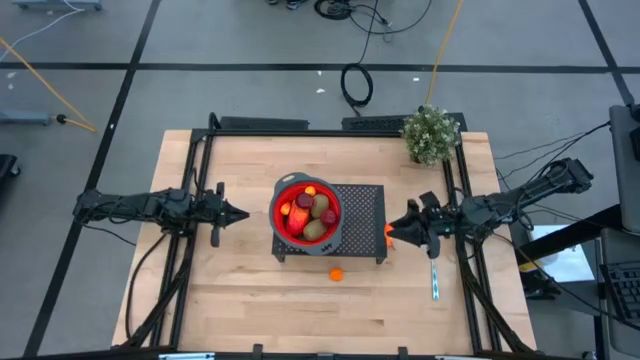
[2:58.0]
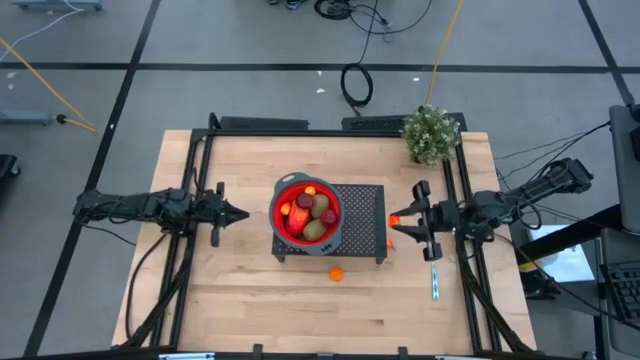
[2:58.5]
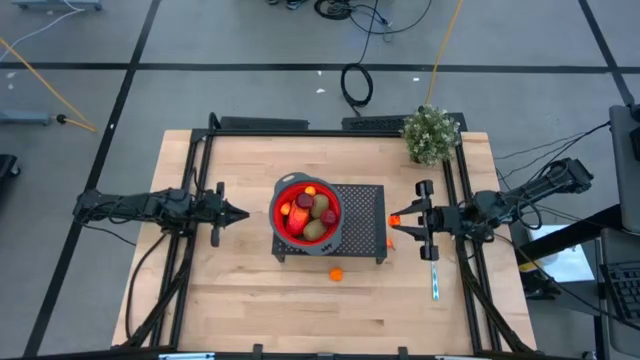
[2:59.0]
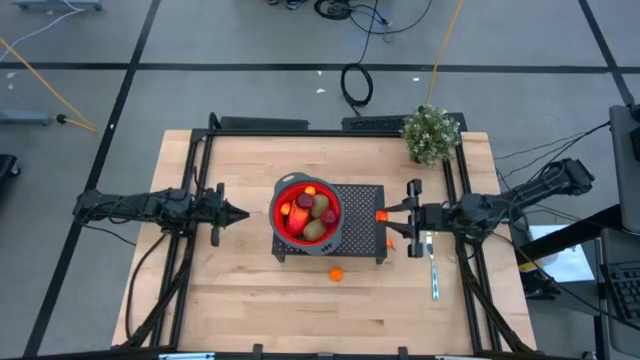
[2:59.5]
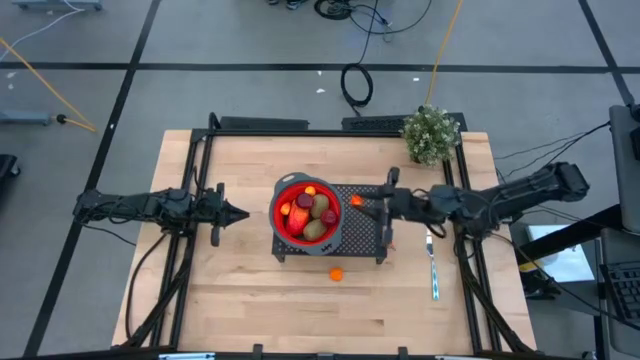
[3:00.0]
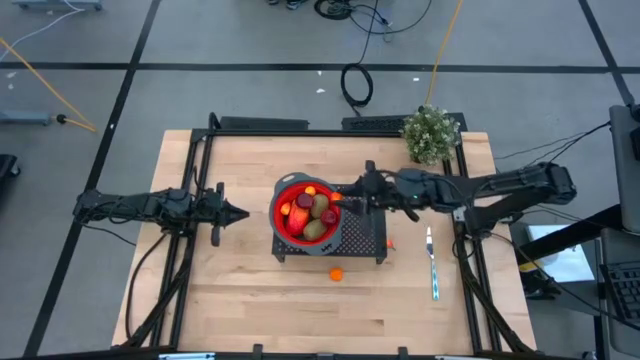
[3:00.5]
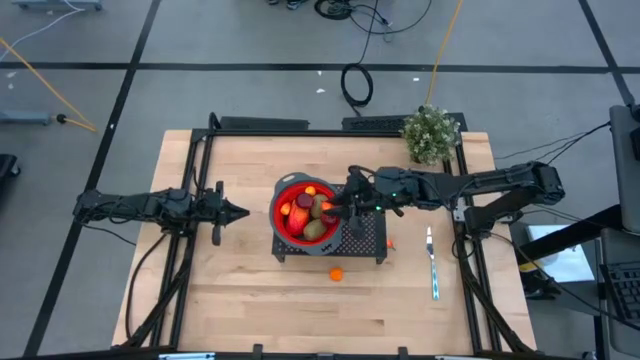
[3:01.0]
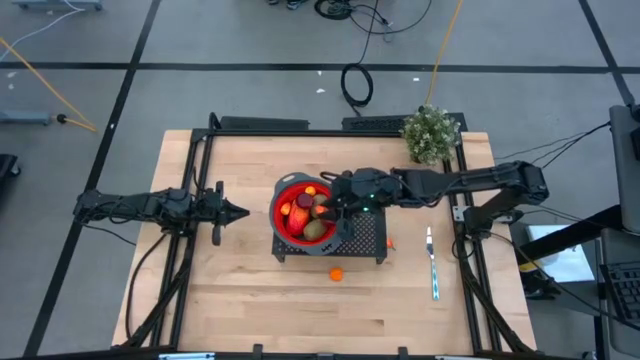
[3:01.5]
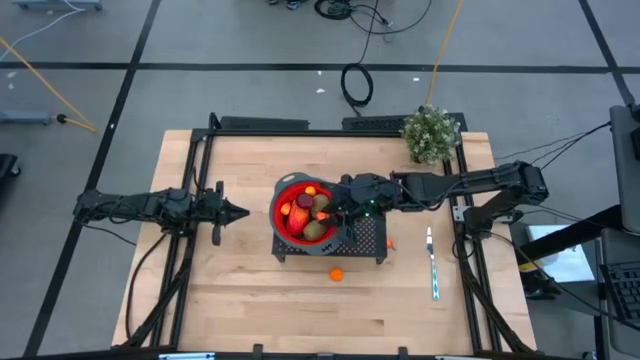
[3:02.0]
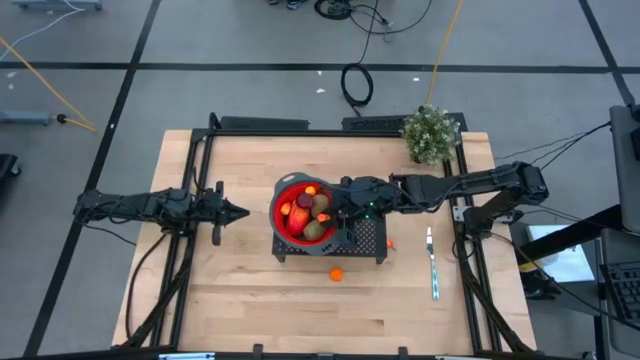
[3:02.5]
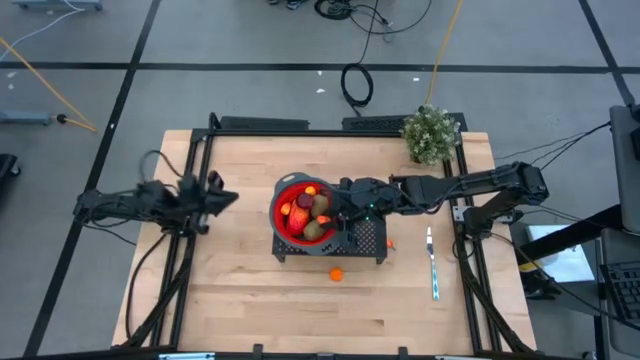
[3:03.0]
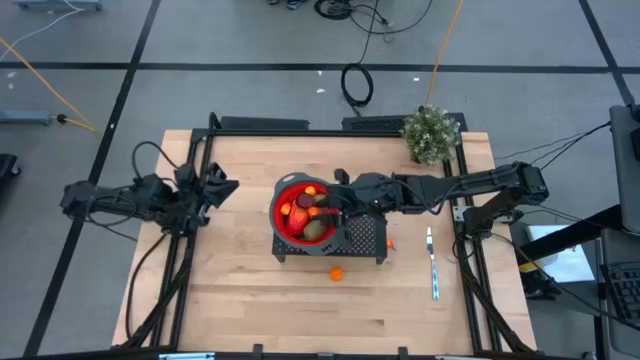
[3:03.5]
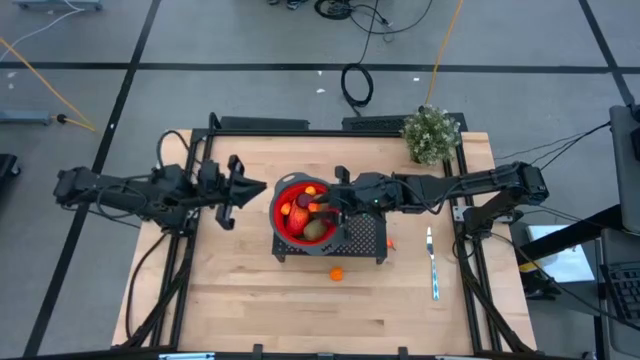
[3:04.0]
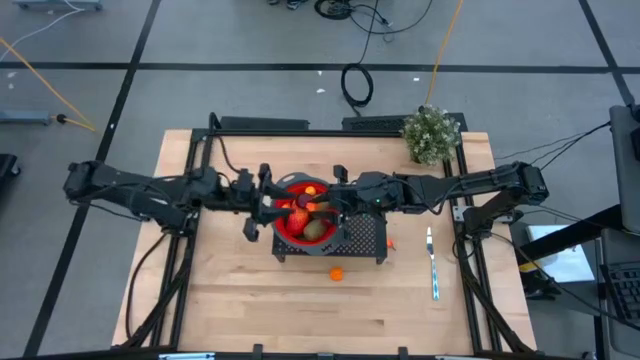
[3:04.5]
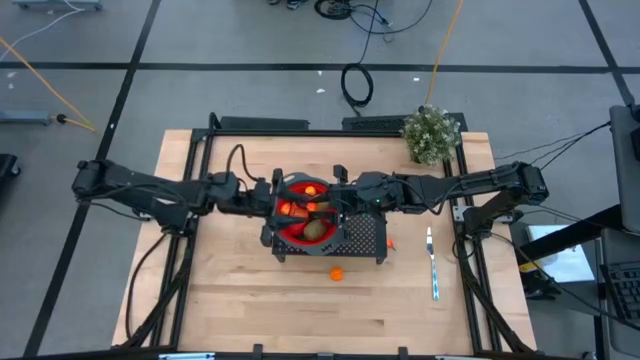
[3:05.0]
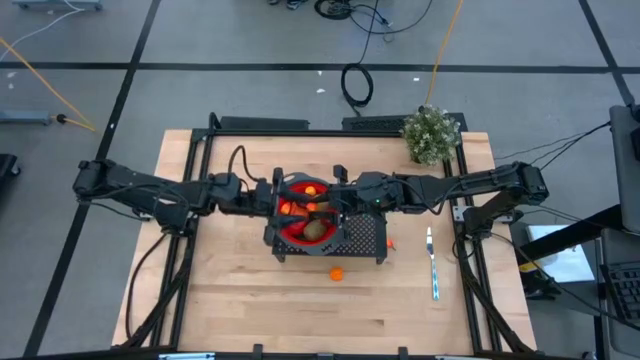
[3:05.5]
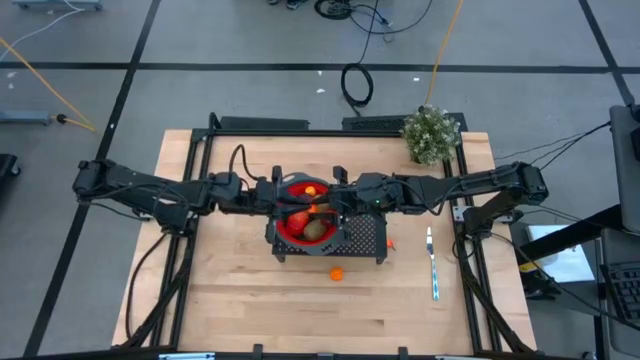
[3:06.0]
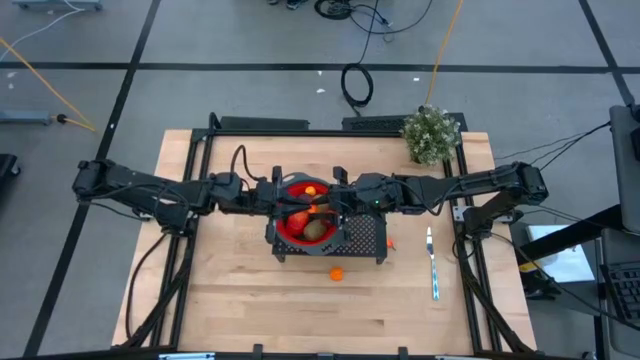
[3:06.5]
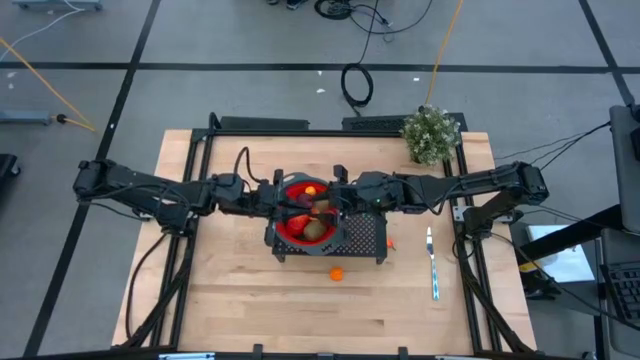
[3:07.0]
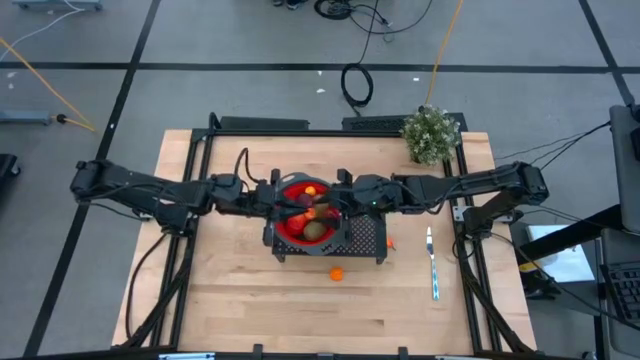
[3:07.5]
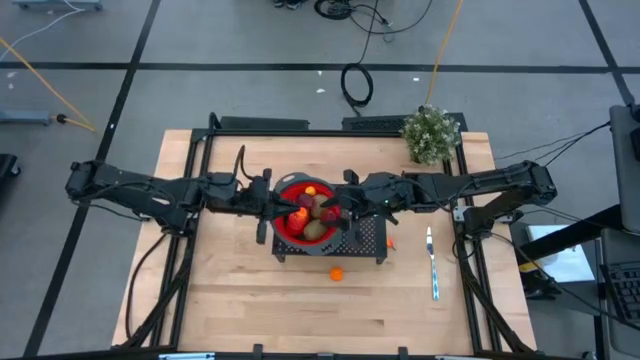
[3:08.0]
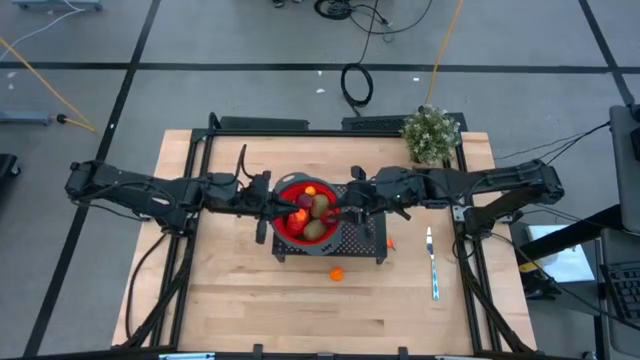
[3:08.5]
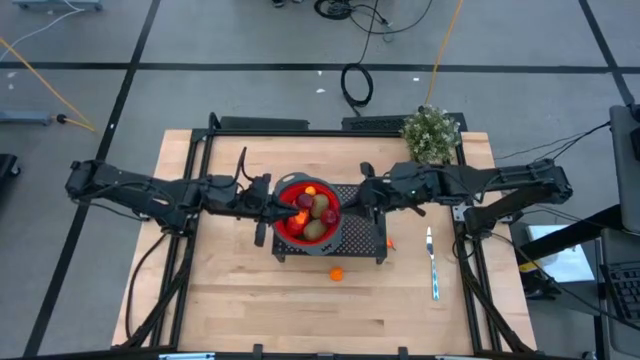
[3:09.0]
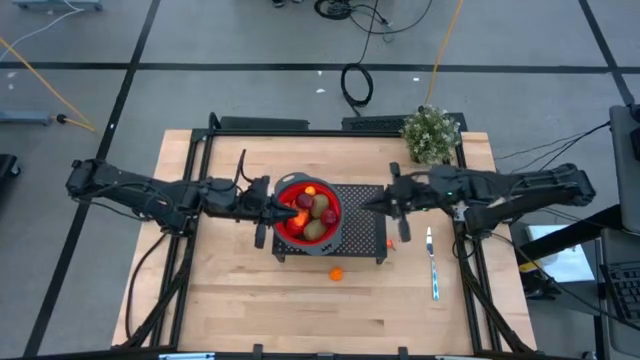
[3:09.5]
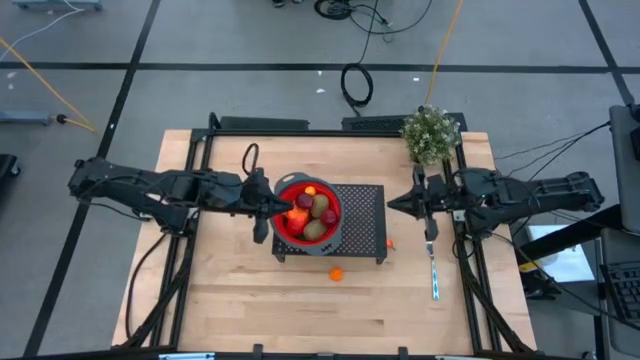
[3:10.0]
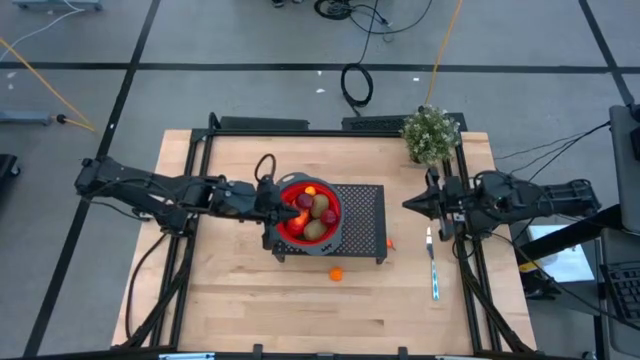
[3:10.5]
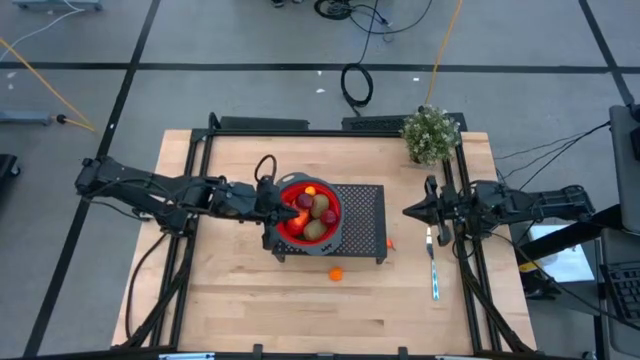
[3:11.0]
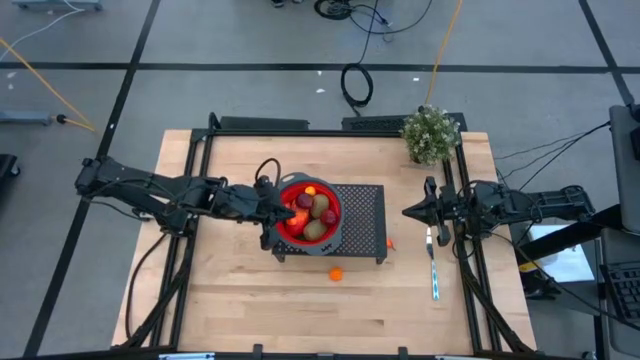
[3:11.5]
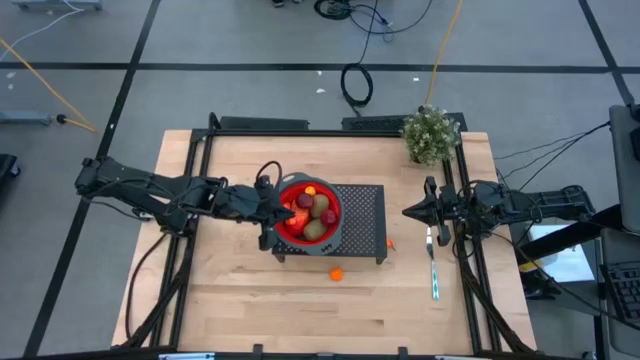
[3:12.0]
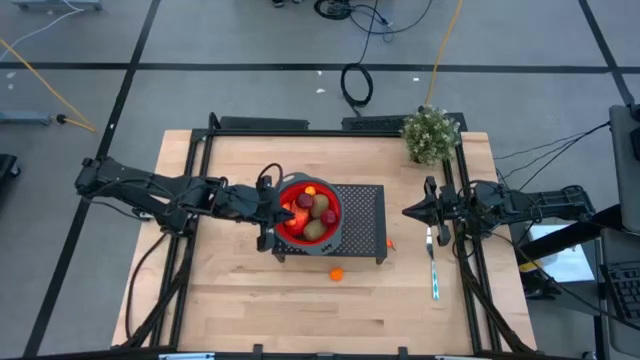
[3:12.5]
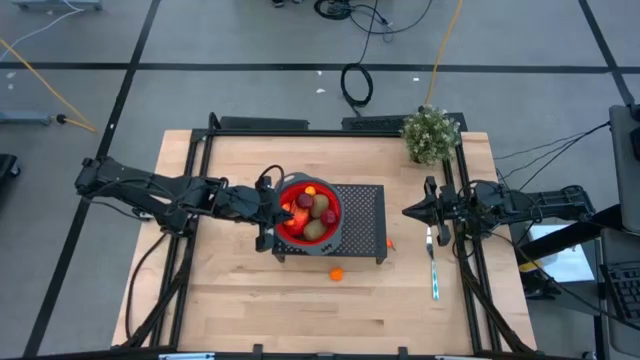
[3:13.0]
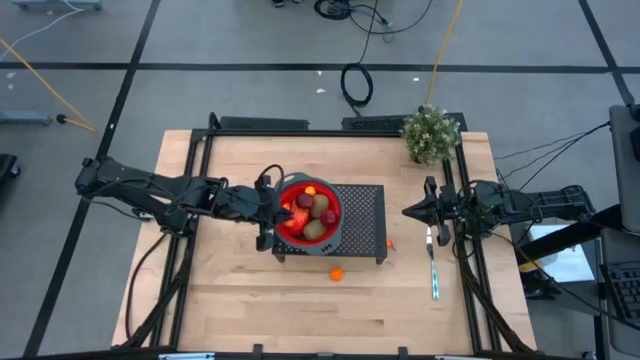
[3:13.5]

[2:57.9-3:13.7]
Task: Pick & Place Fruit
Put the peach into the red colander on the shelf

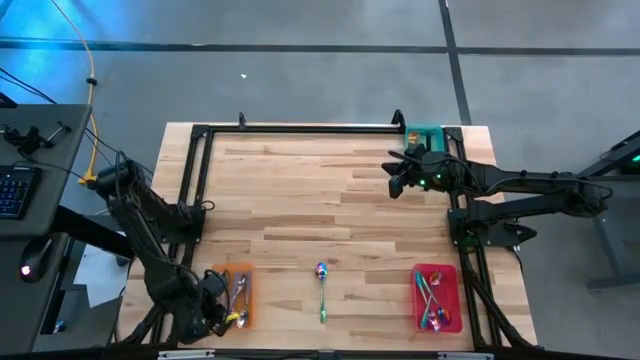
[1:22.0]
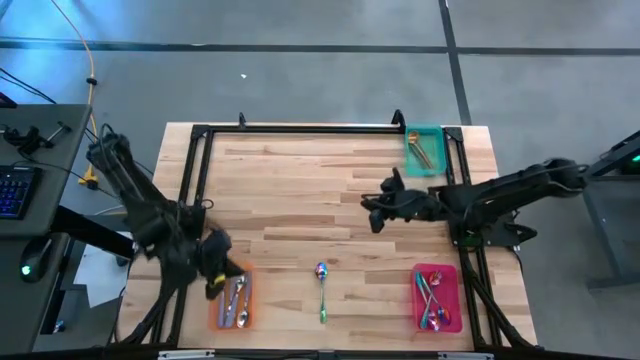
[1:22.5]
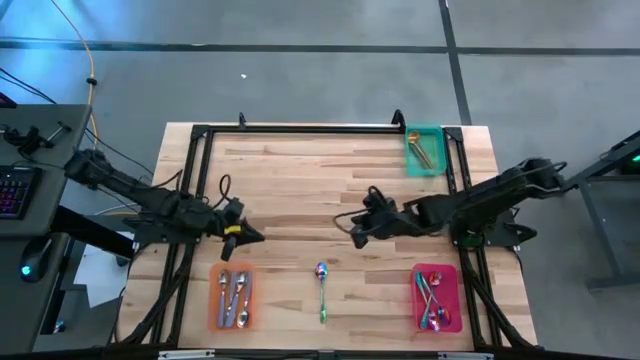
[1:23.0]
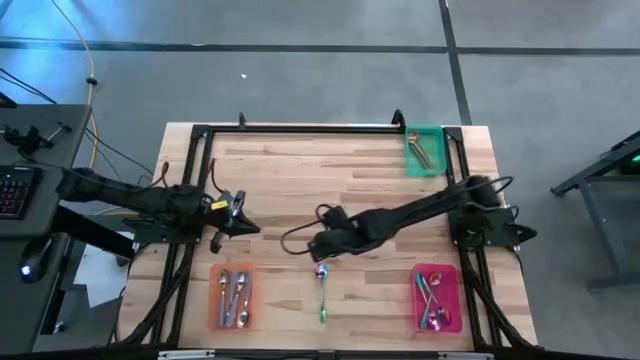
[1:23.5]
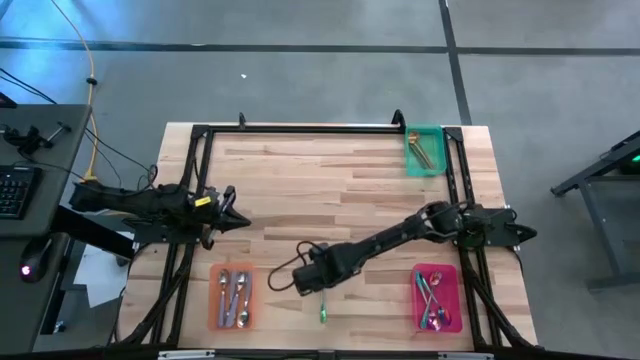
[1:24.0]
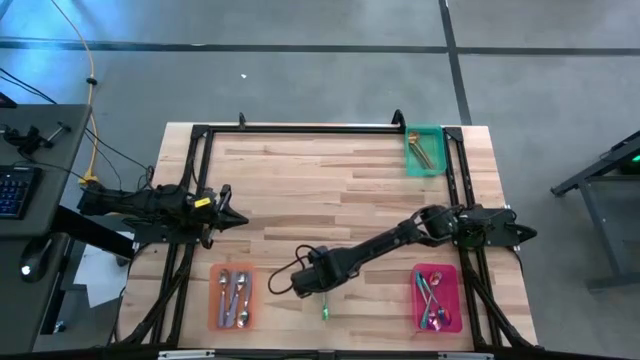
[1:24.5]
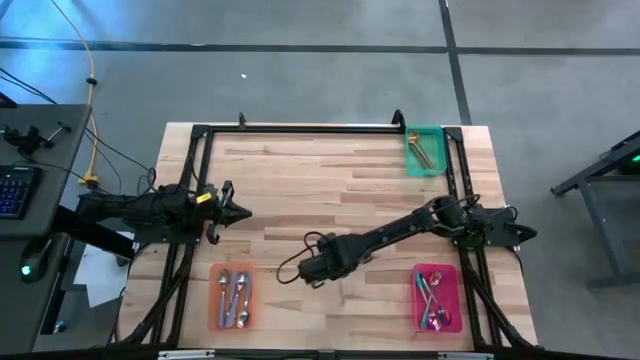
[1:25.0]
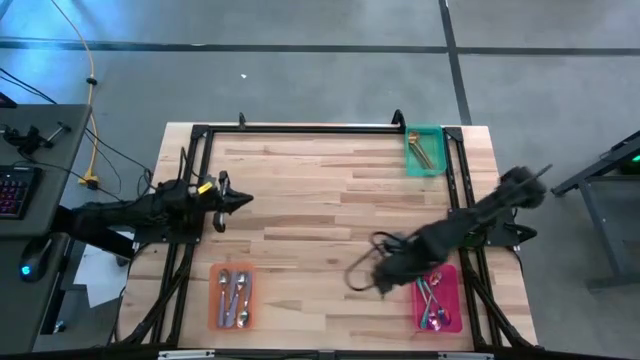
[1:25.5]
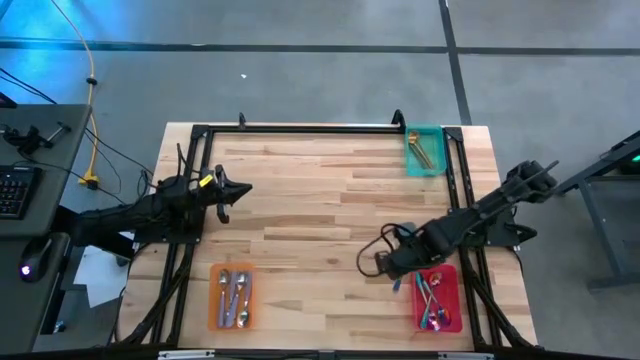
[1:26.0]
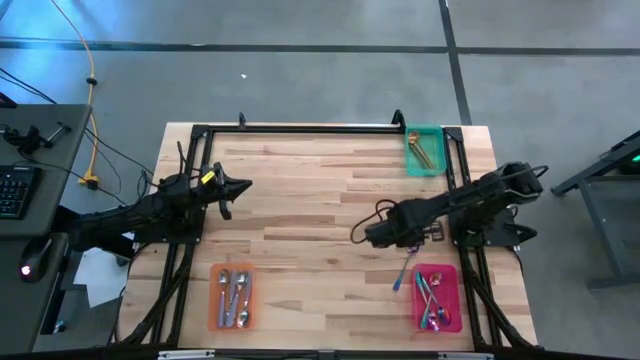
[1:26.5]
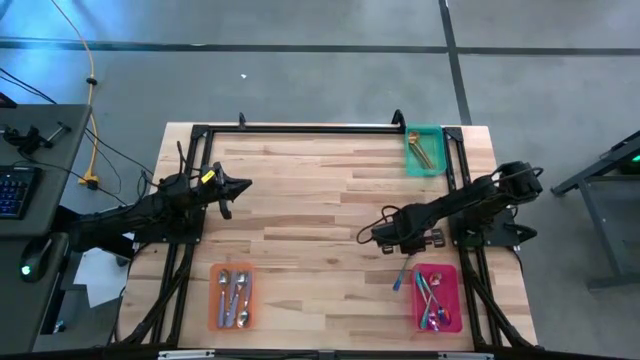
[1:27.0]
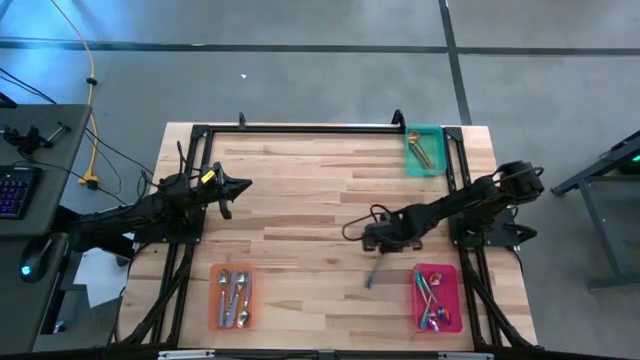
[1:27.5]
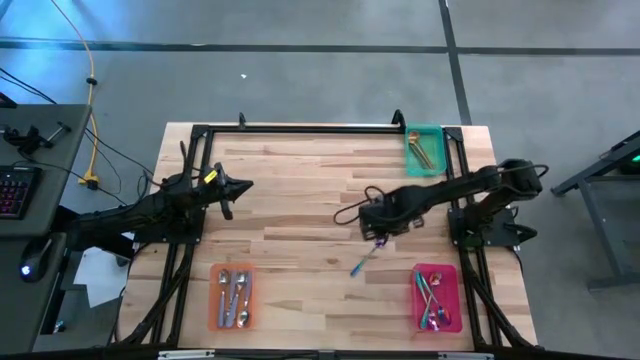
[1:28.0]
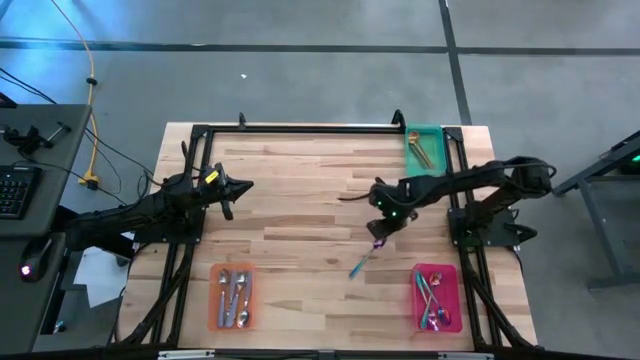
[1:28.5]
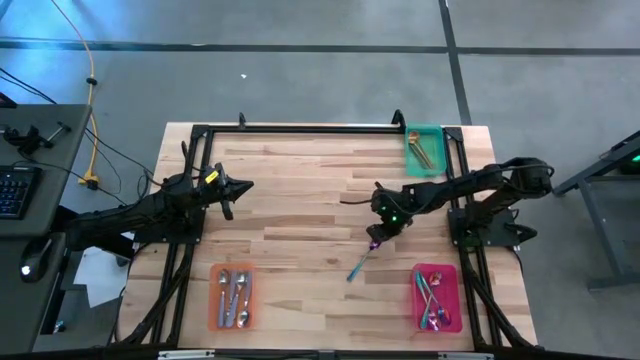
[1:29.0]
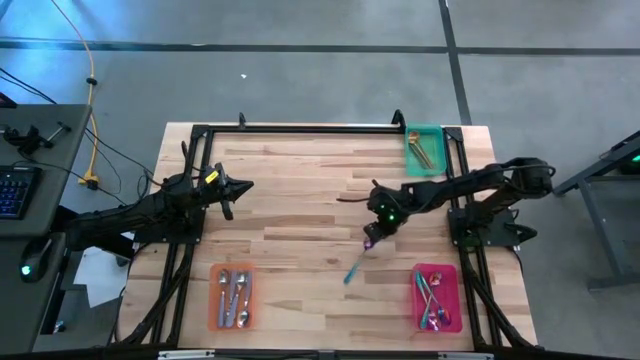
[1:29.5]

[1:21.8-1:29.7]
Task: Sort silverware by color (type)
Put the blue spoon into the red bin
